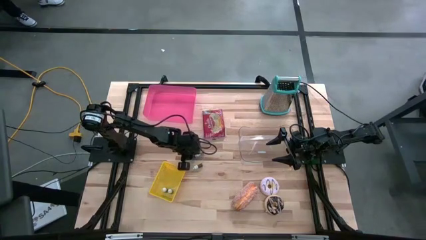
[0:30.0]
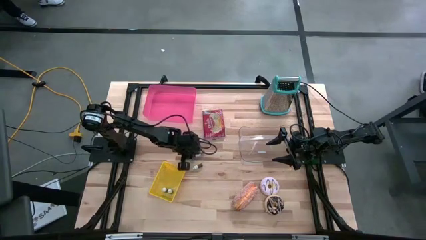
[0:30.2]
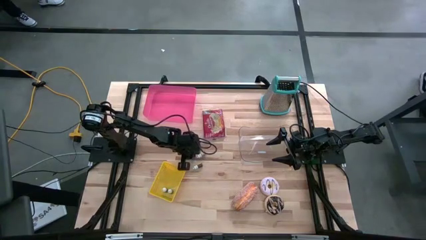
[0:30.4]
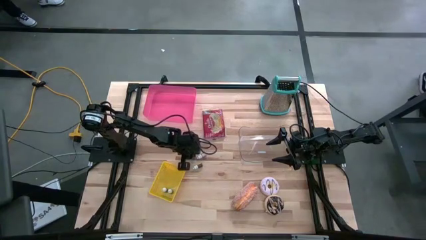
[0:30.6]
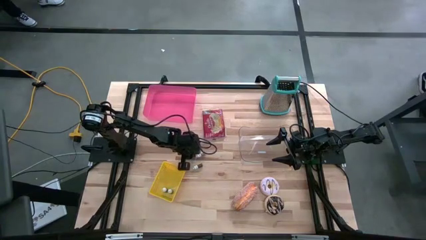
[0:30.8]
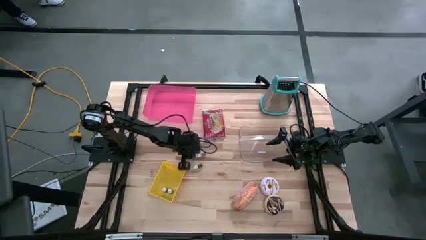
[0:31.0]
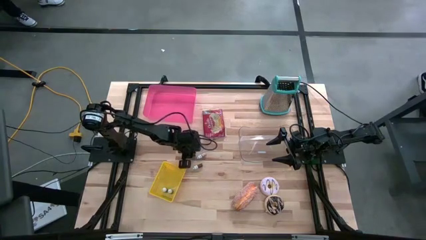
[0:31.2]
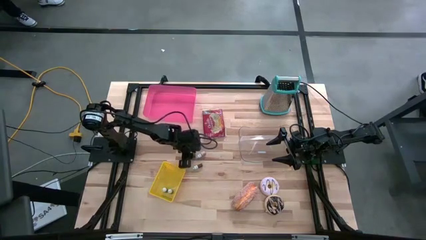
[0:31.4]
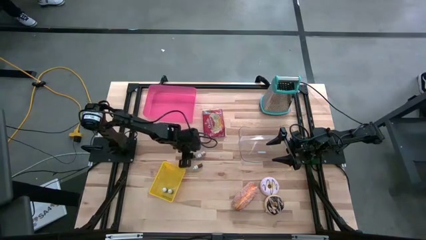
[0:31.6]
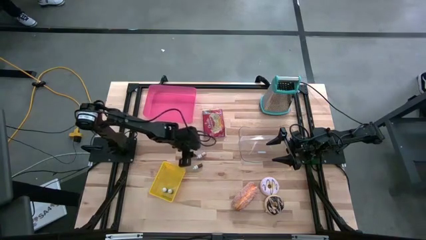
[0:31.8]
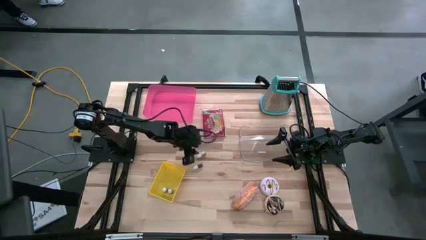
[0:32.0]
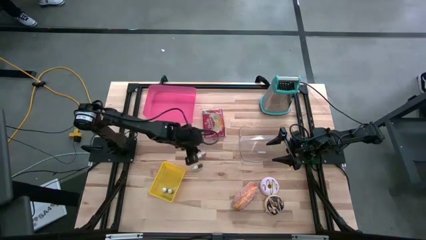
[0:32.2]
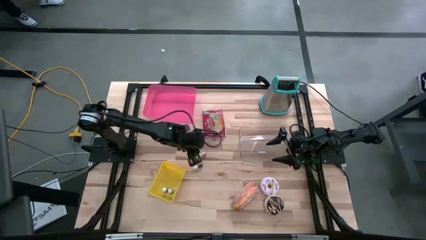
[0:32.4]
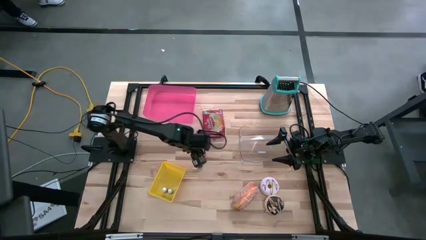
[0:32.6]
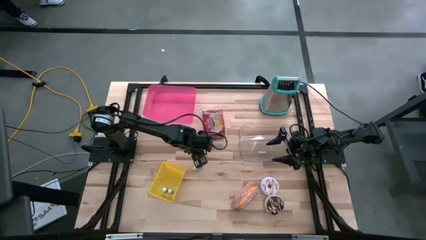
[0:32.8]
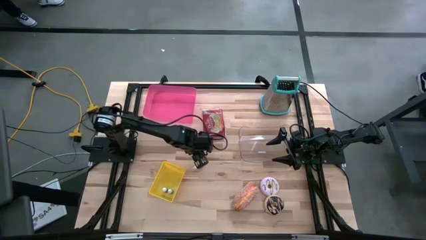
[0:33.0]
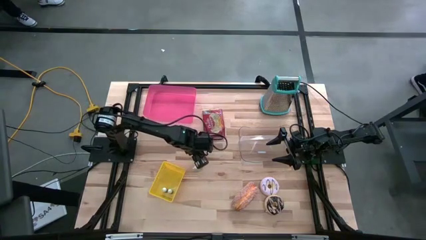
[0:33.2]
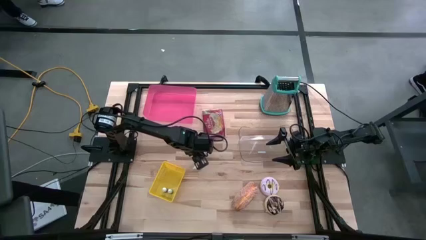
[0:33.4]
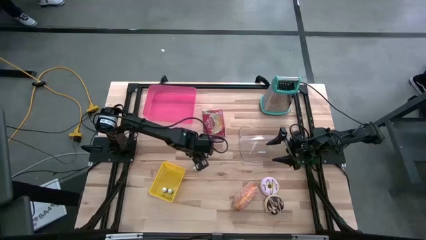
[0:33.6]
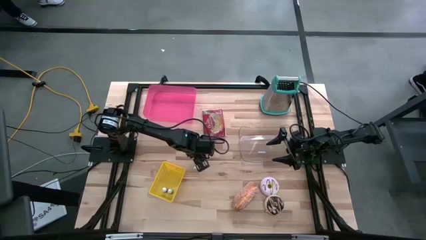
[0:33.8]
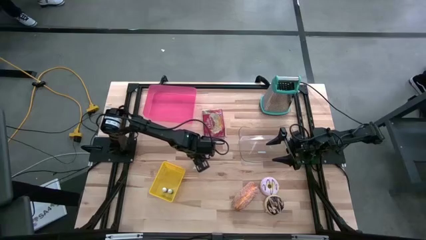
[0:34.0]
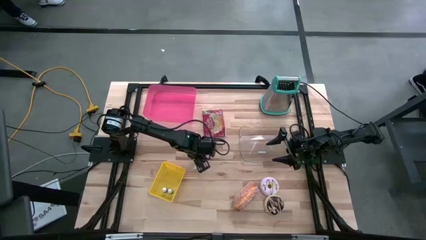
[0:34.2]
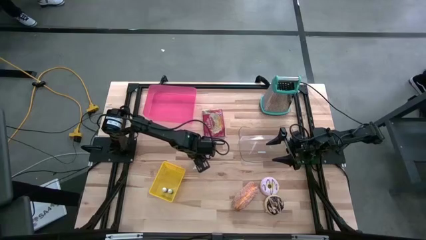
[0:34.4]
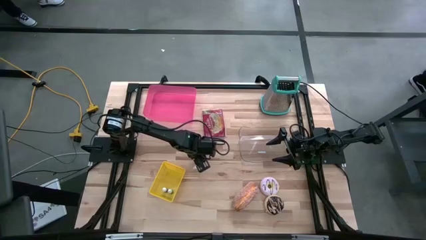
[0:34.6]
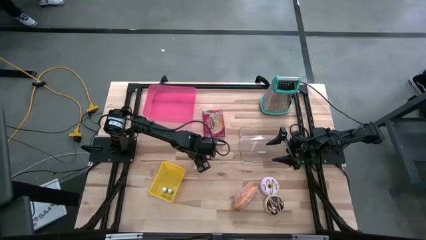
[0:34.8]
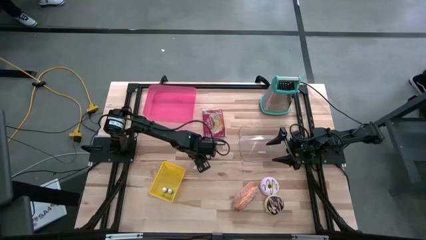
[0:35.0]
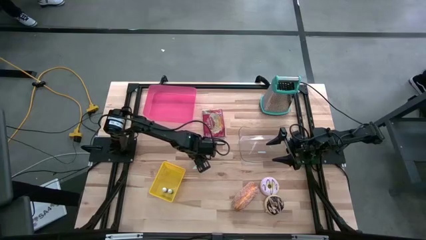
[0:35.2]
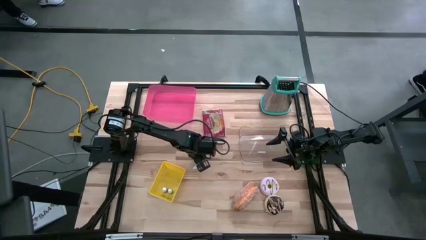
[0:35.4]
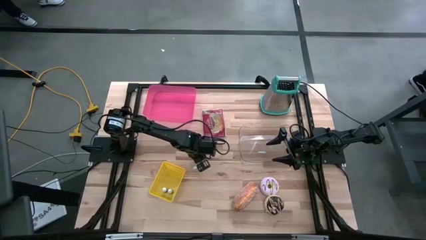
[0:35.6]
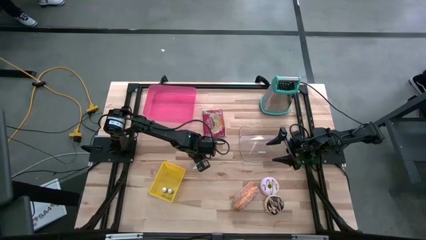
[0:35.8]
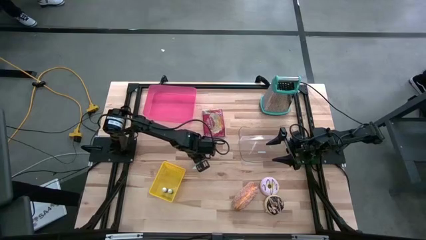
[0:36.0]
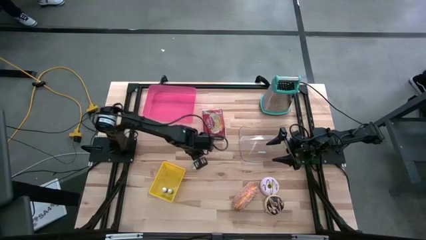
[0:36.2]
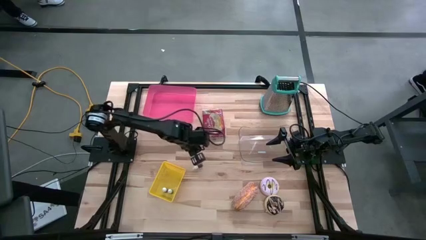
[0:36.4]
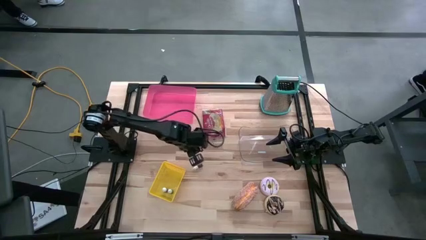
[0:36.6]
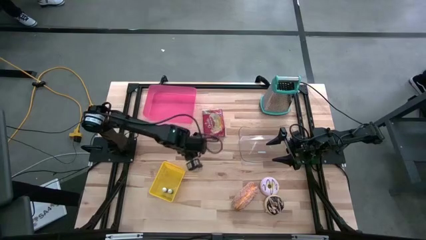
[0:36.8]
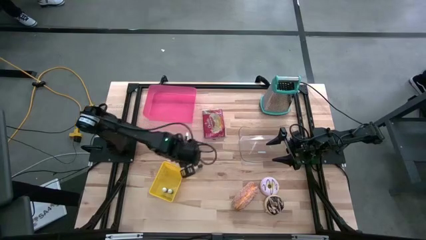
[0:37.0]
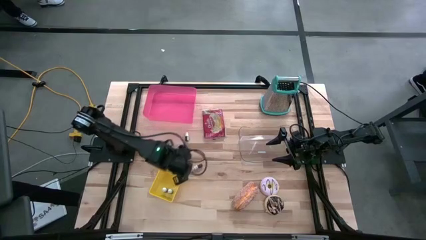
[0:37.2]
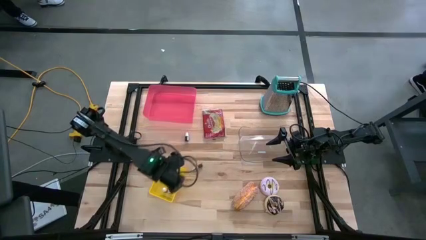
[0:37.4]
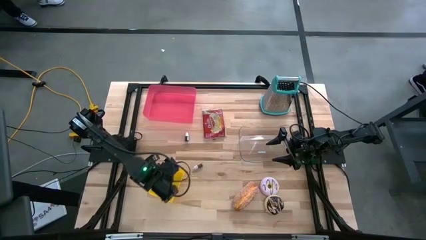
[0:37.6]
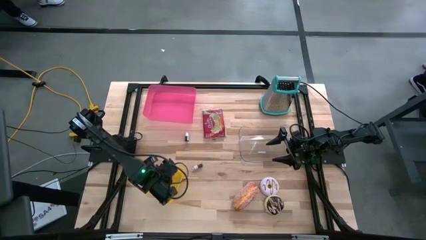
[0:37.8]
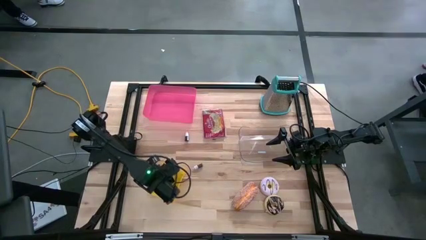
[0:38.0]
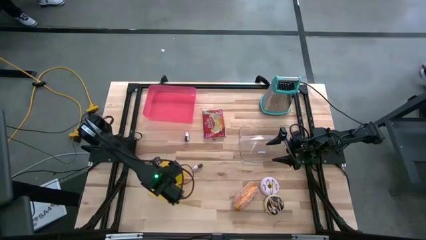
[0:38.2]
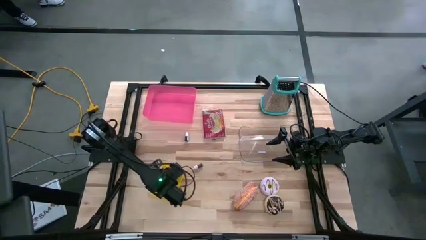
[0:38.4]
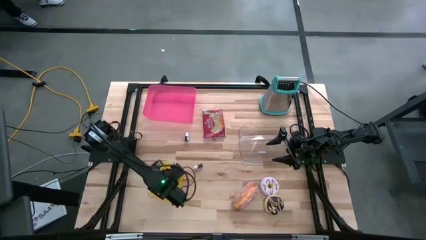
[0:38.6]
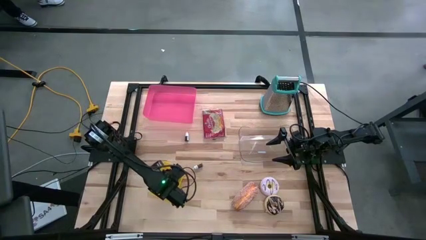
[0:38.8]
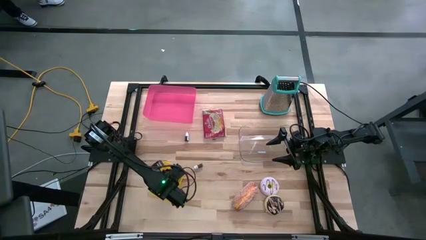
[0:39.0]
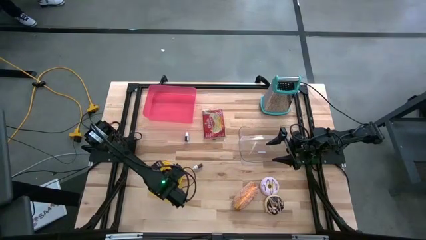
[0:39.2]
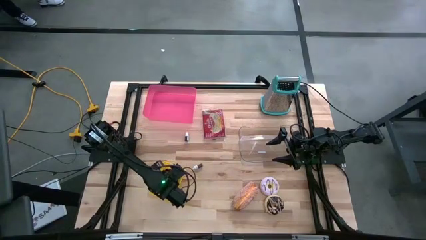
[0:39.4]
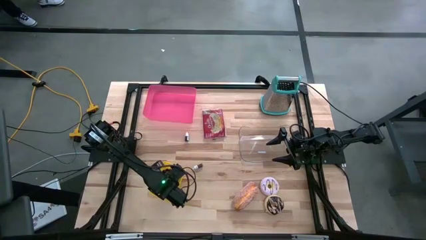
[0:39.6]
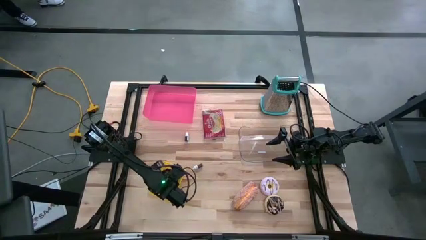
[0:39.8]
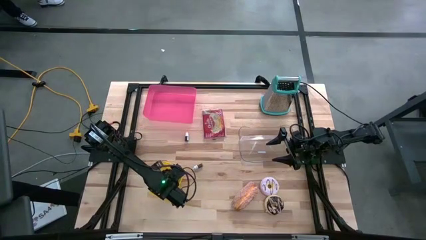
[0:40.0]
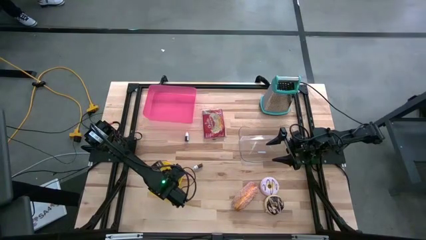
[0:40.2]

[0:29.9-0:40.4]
Put the orange food coloring bottle into the yellow bin
